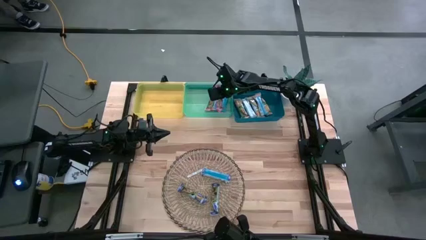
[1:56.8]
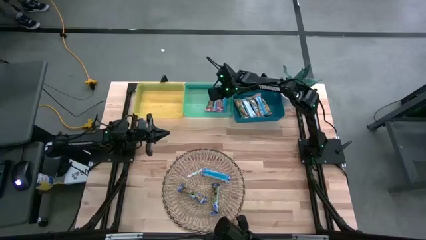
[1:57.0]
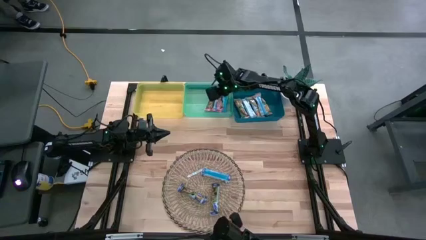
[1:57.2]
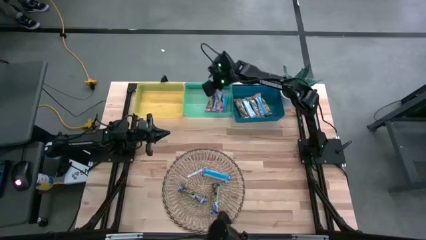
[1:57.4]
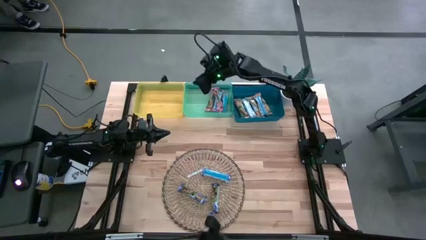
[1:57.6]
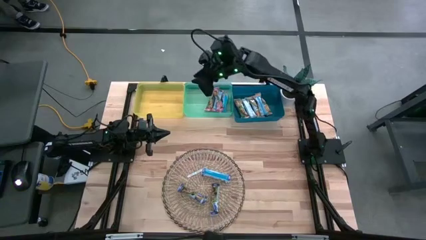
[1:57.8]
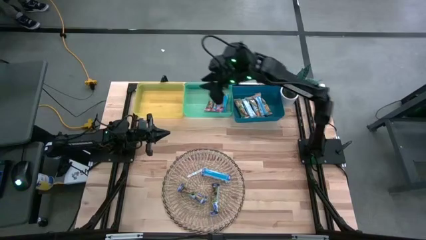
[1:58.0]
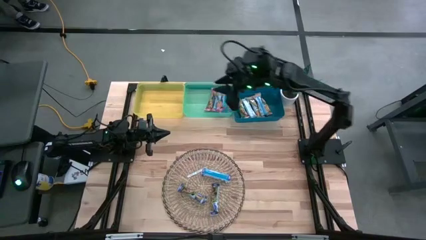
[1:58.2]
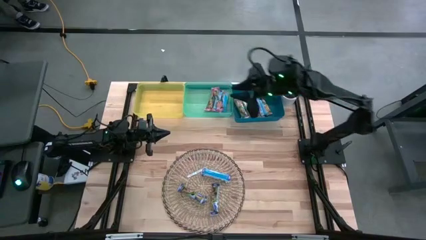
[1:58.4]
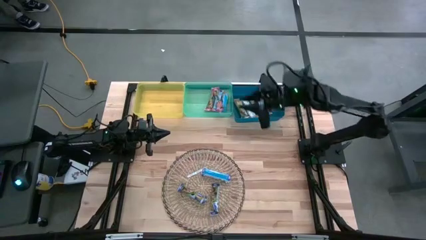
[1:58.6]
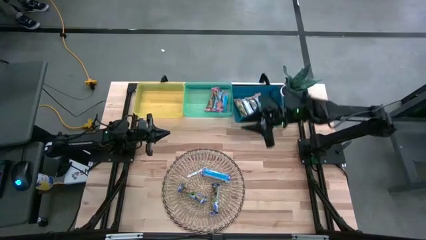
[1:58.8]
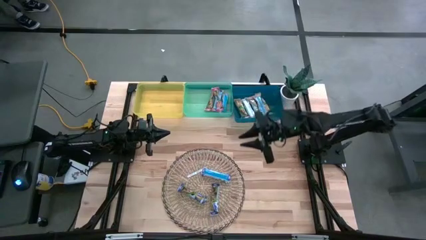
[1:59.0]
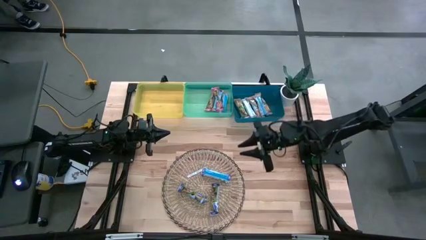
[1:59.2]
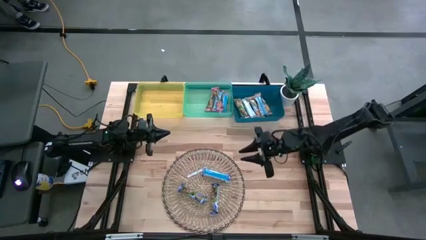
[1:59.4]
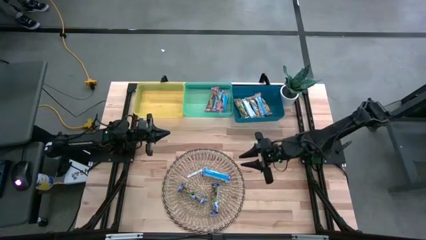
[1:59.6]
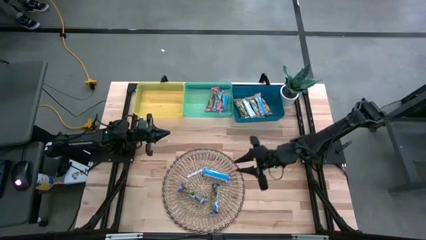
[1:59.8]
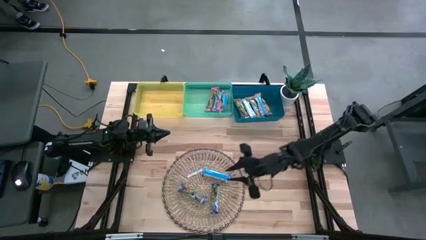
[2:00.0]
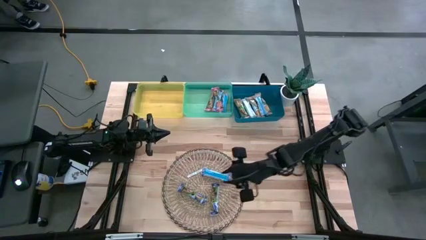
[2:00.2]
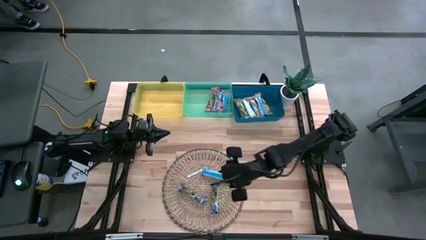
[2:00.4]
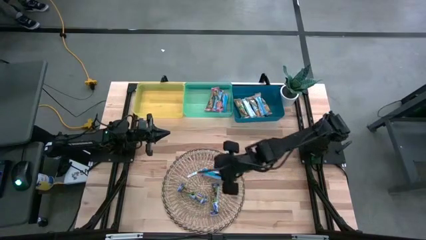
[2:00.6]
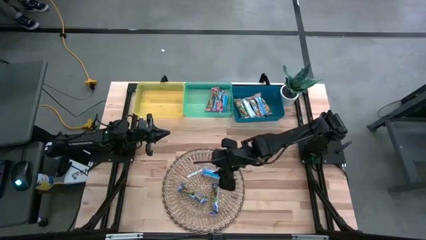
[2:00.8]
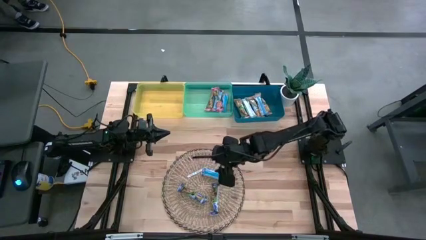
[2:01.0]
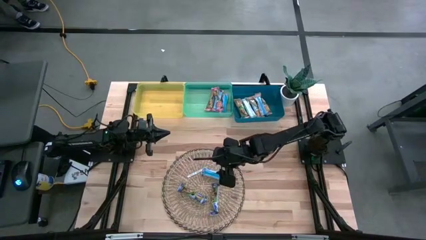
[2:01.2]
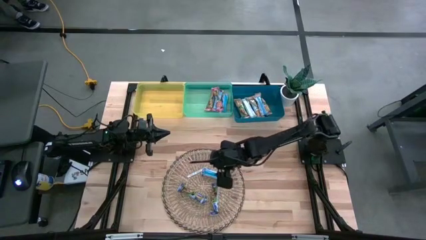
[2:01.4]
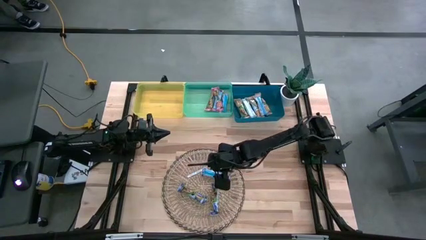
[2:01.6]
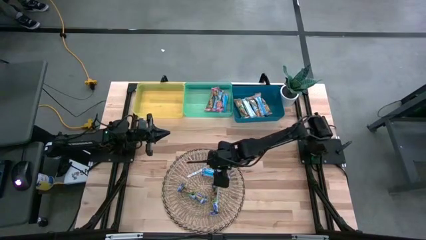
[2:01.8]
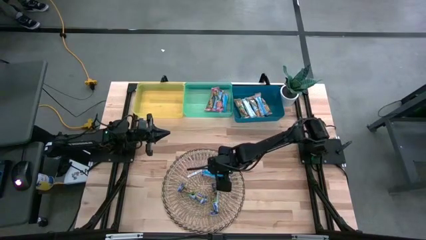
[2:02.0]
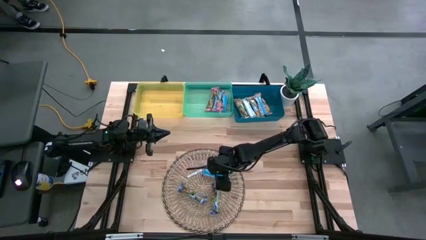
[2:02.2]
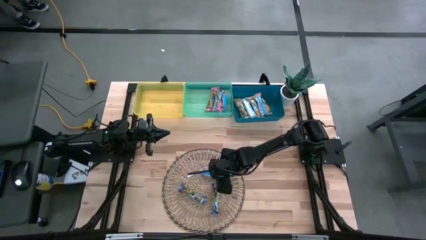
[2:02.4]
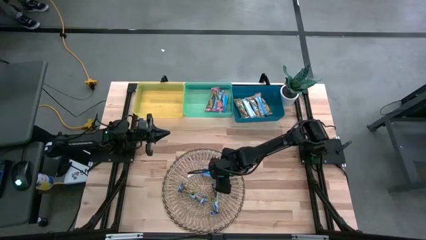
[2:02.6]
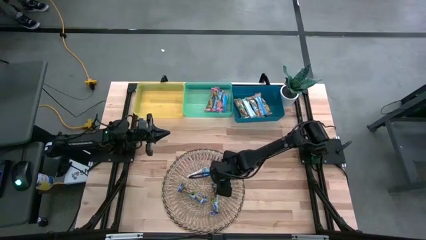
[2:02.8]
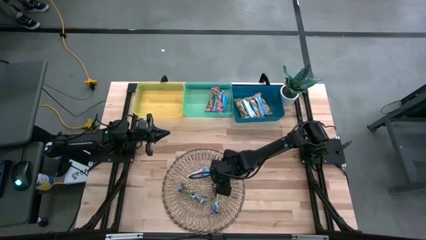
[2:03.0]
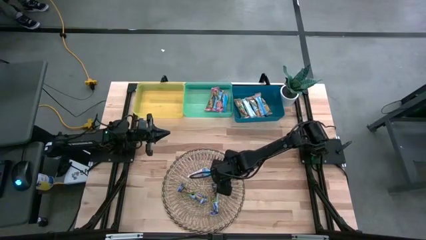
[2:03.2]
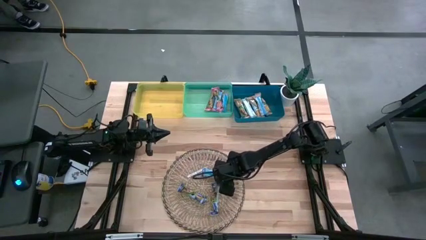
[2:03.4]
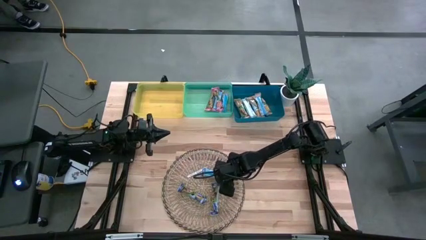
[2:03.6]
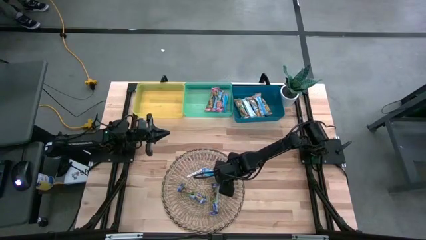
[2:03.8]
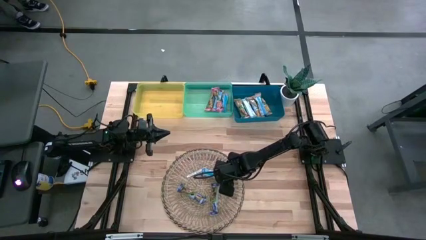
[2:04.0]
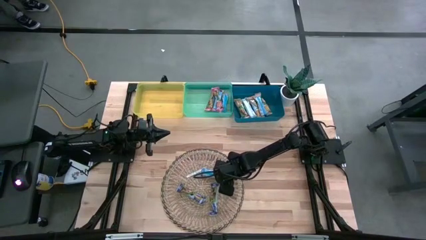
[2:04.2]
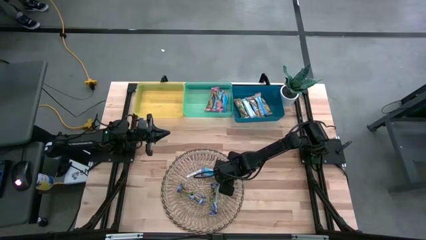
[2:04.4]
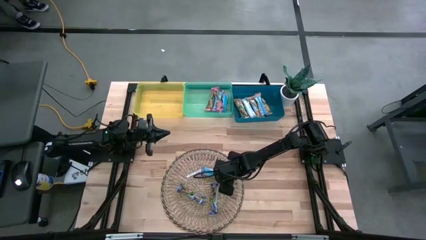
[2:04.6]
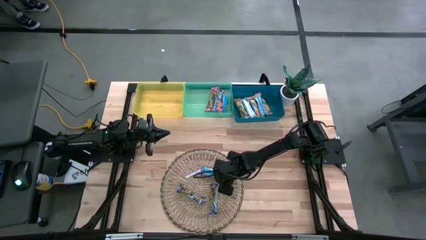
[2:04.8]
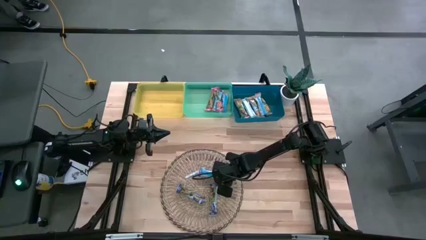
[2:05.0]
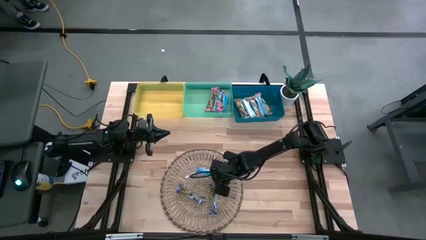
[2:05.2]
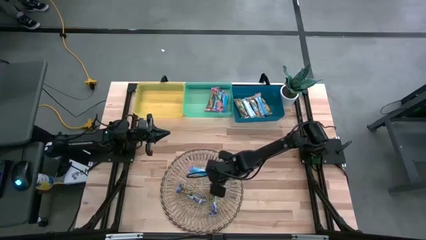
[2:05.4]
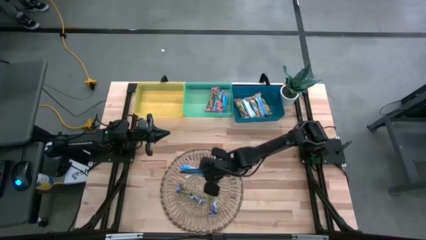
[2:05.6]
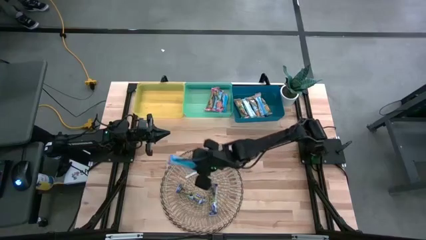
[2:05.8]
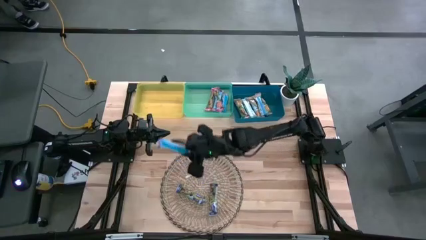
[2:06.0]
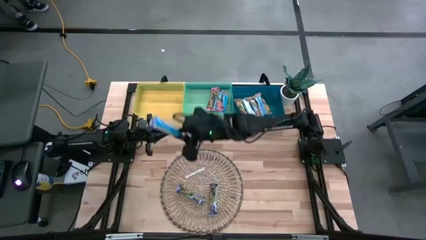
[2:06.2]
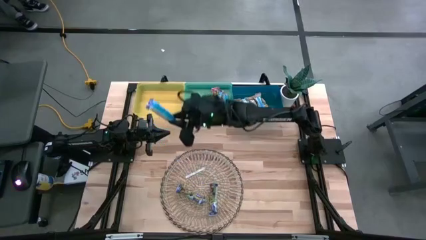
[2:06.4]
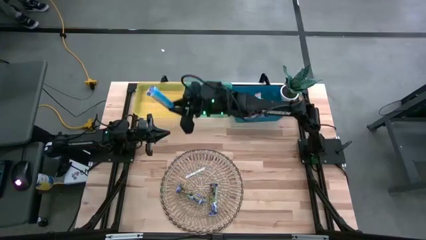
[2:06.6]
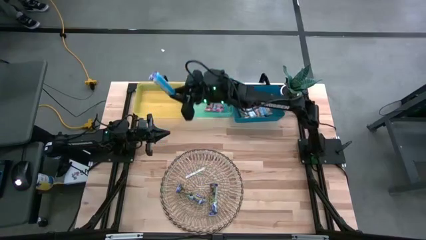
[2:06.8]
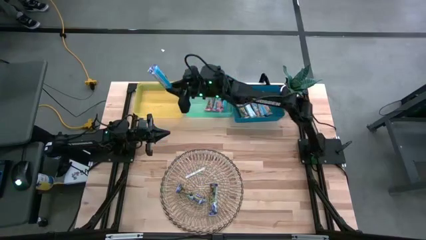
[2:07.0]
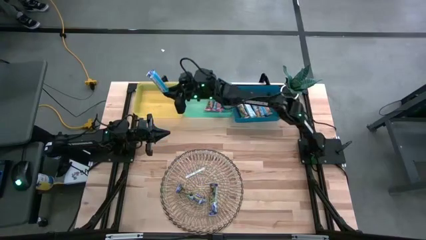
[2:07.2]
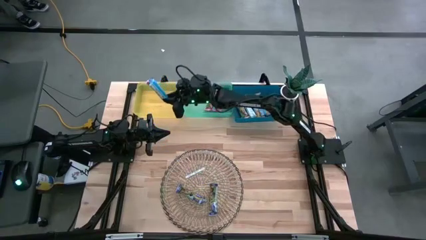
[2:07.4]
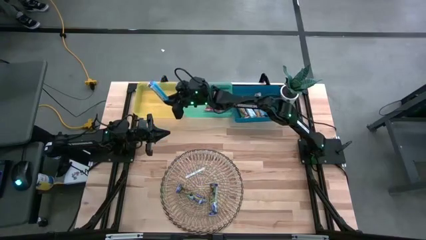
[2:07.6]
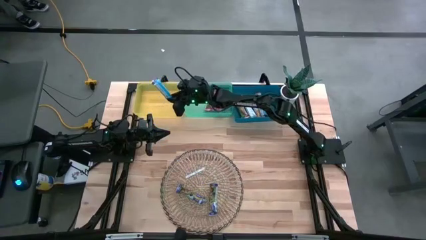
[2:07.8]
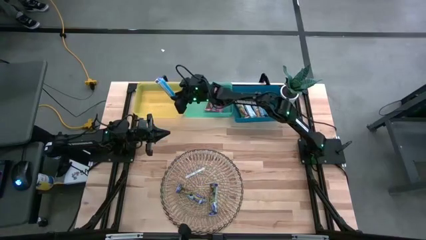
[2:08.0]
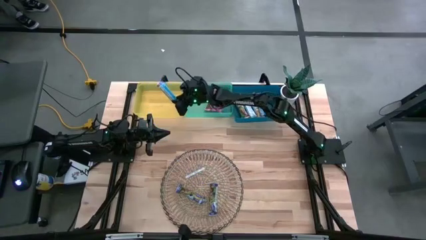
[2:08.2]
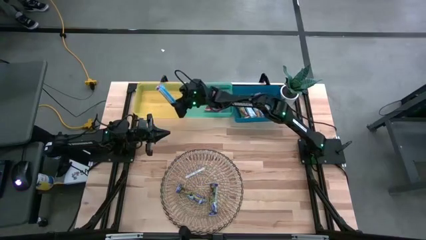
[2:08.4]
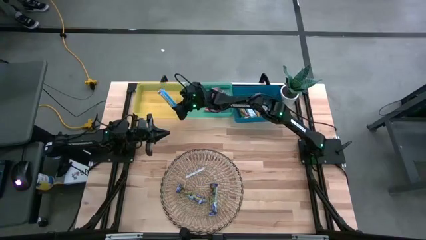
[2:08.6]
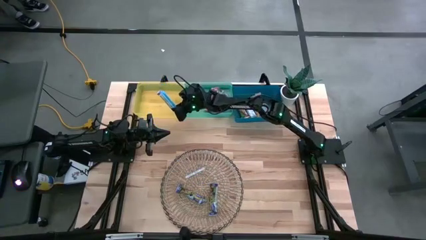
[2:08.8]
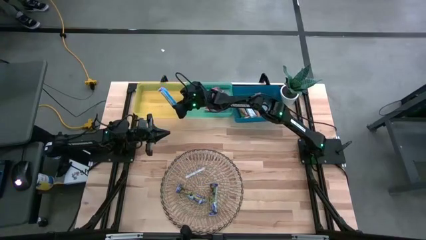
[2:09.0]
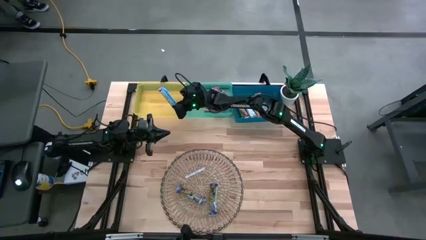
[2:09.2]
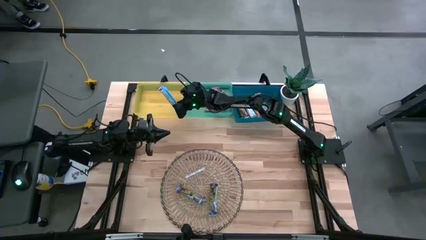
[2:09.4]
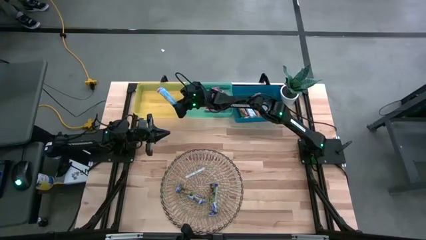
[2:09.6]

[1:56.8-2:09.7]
Task: Pick and place Granola Bars by type
Put the blue granola bar into the yellow bin
